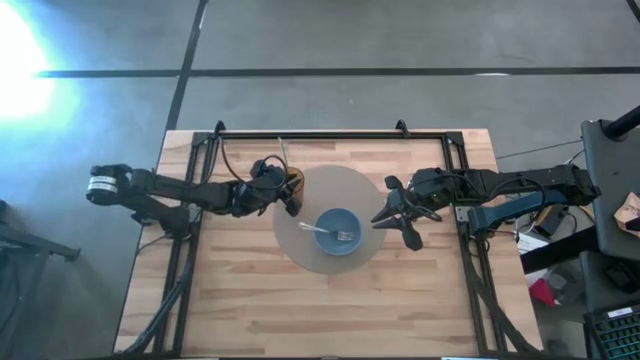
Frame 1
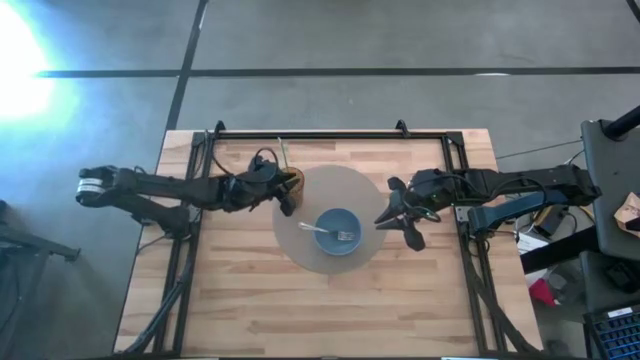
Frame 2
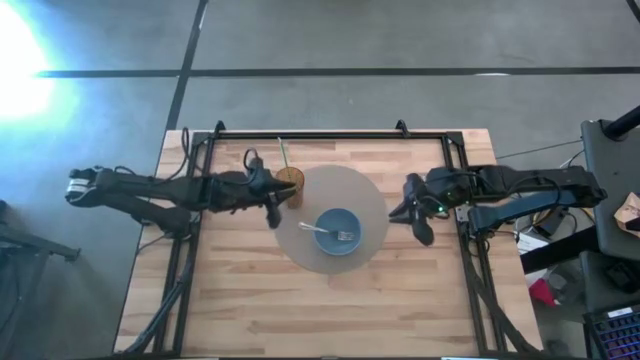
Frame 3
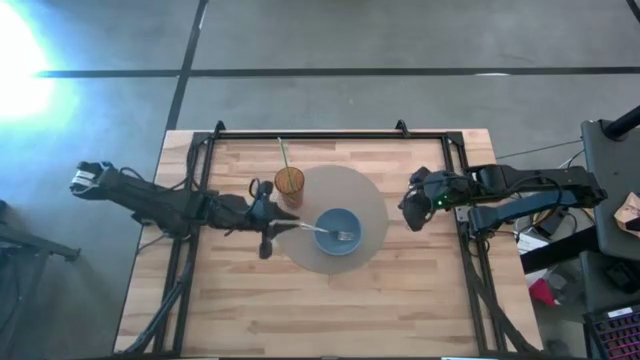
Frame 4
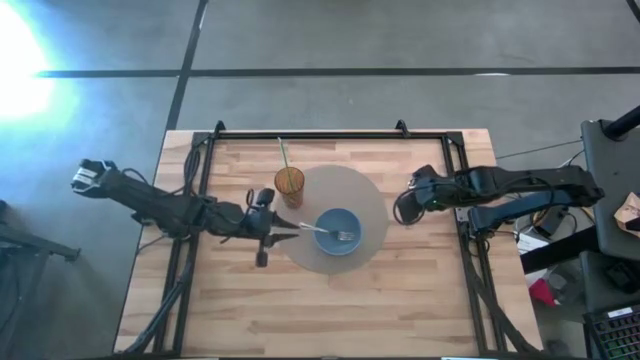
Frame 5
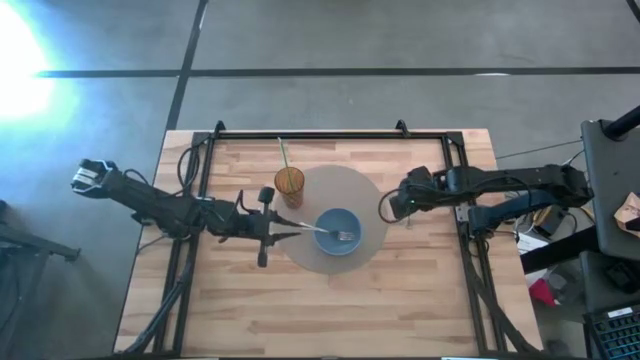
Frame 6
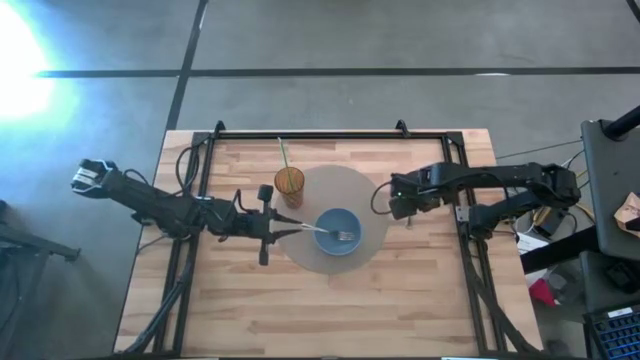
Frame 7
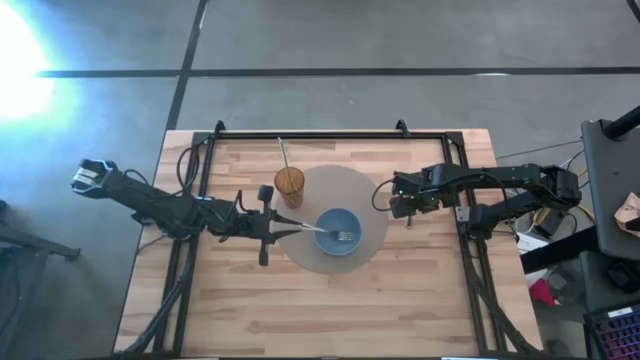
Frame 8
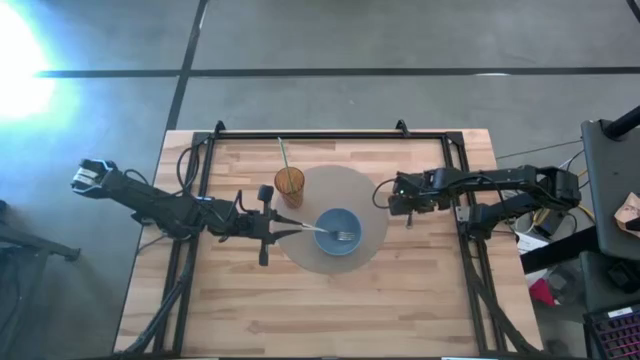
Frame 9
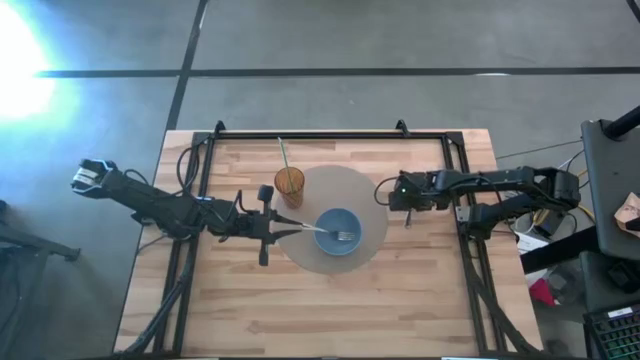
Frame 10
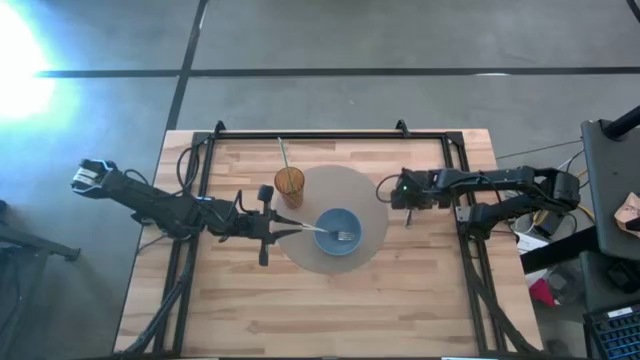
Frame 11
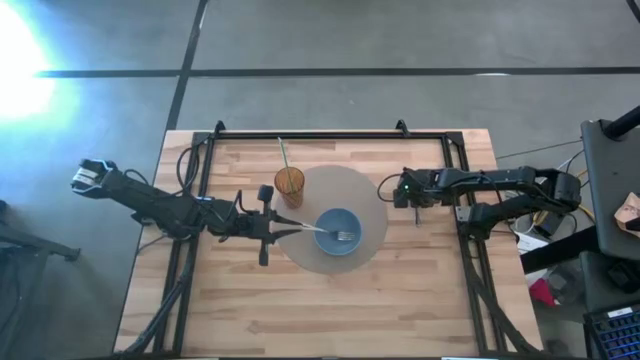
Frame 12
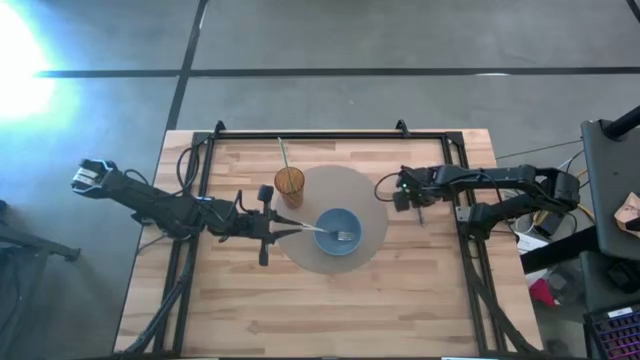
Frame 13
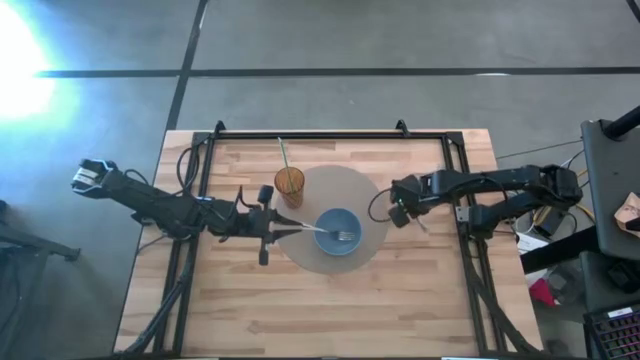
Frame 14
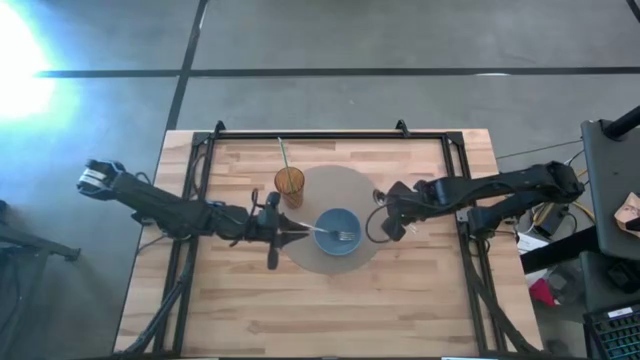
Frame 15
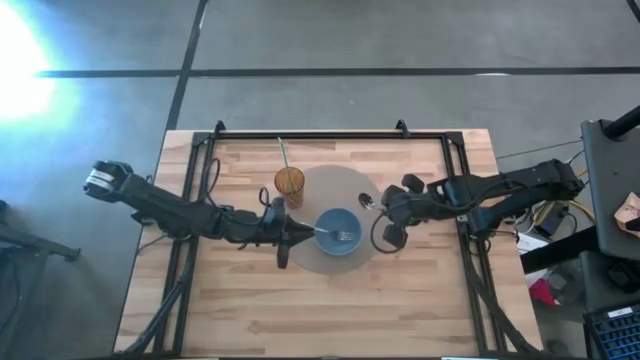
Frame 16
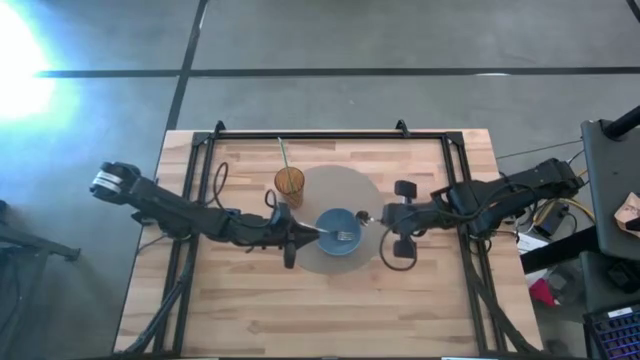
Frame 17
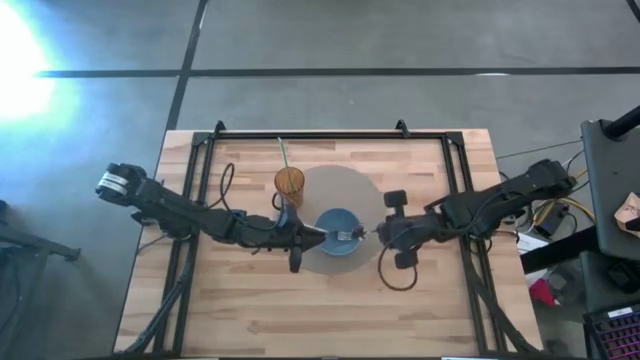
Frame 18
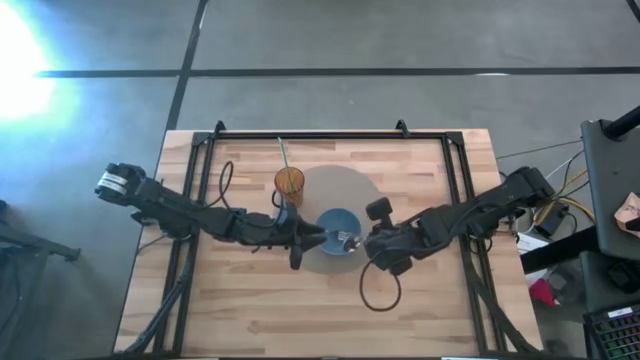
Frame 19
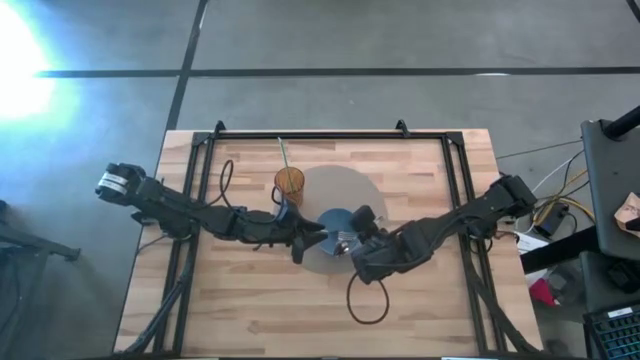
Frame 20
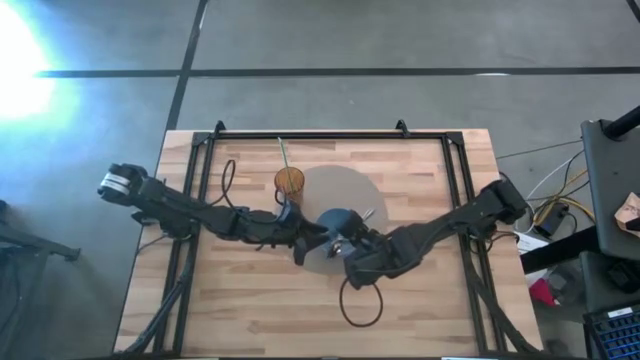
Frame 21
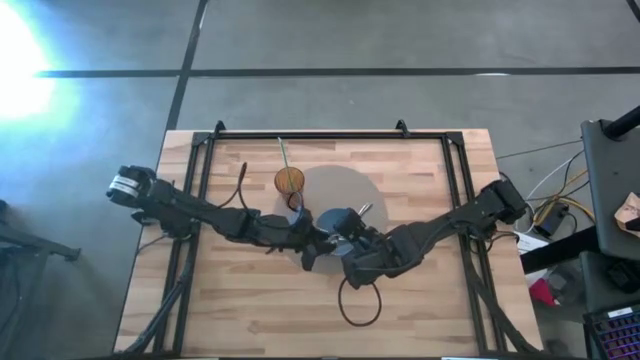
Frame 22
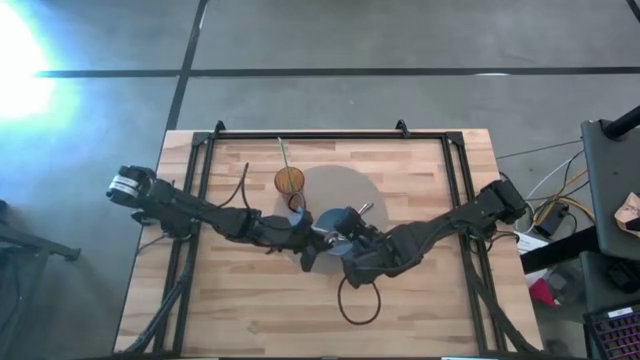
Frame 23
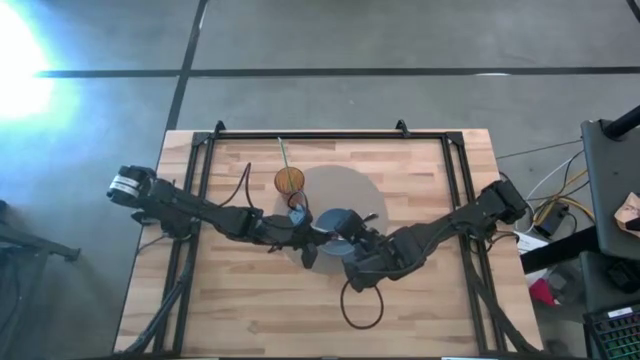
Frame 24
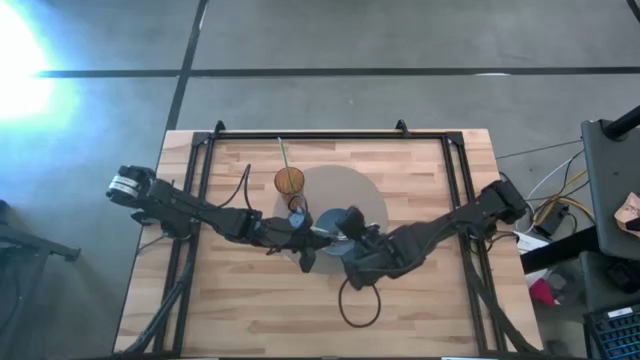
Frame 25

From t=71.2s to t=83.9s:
Task: Pick & Place Utensil
Put the spoon into the bowl

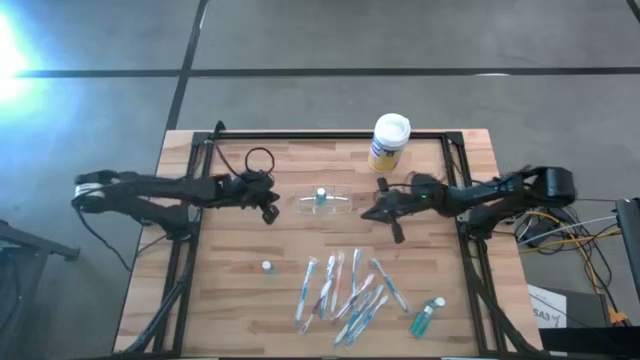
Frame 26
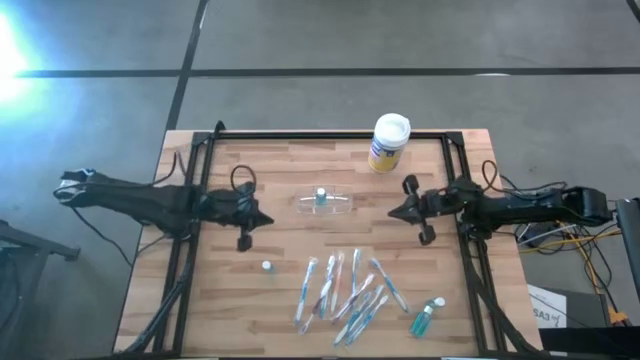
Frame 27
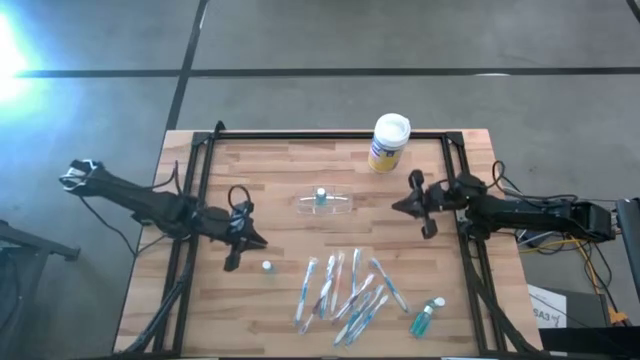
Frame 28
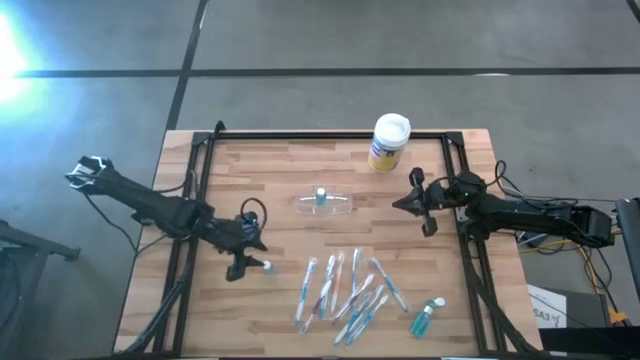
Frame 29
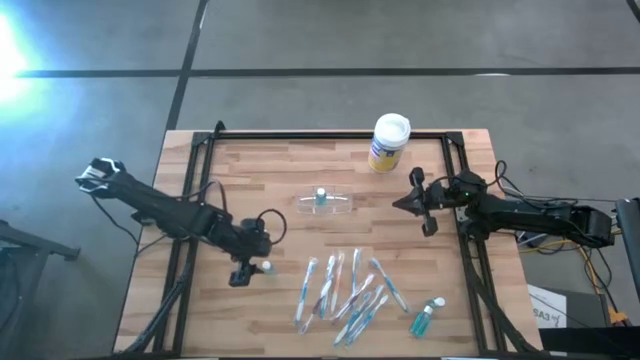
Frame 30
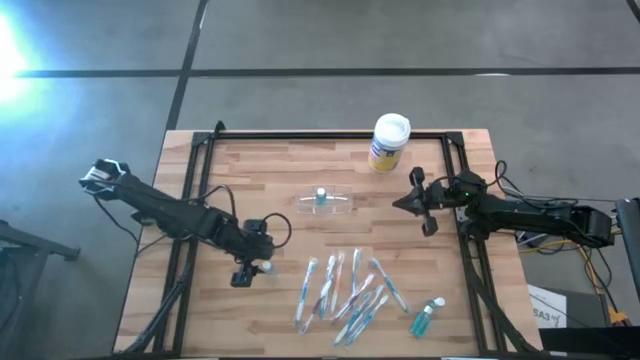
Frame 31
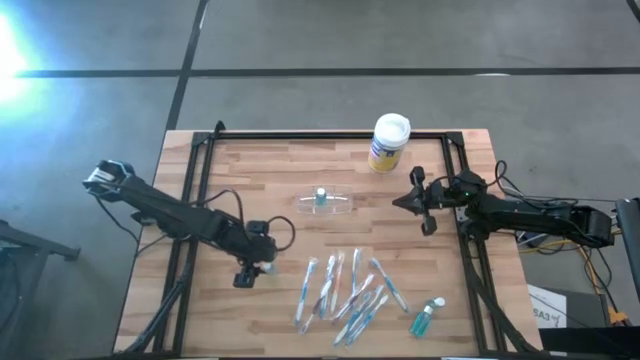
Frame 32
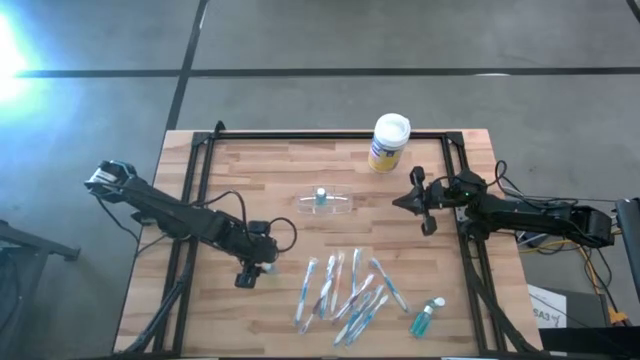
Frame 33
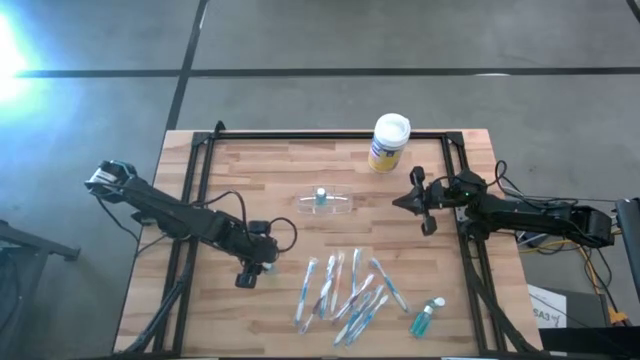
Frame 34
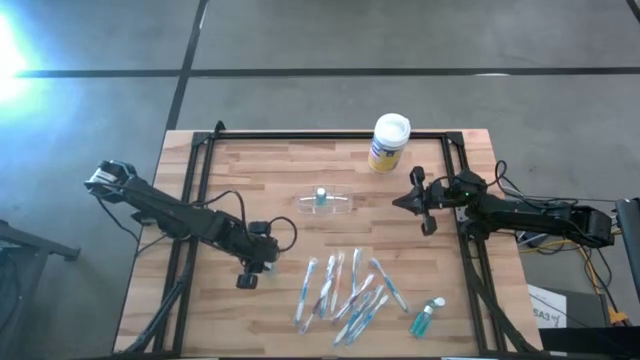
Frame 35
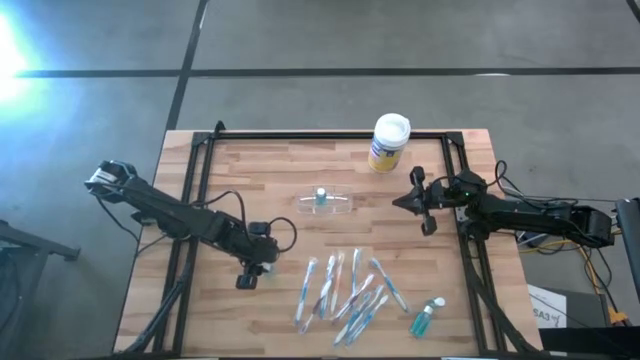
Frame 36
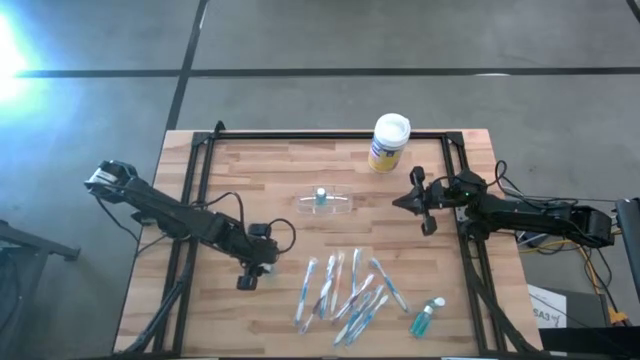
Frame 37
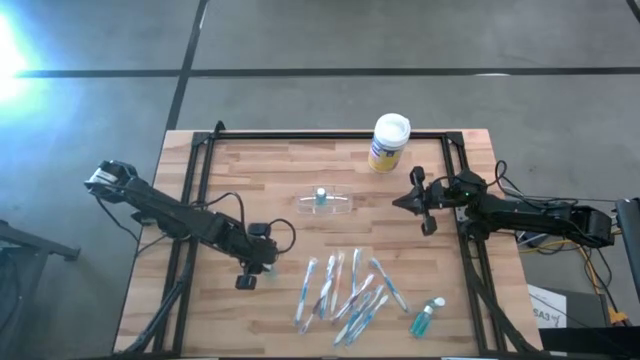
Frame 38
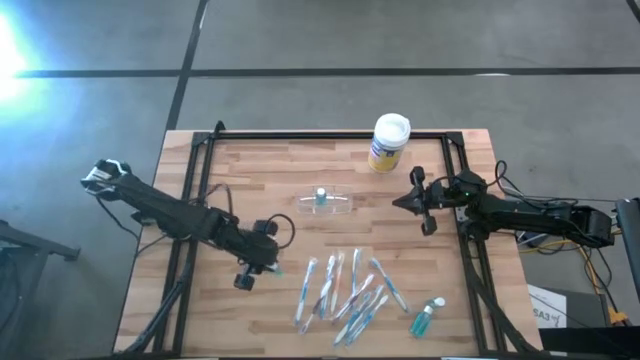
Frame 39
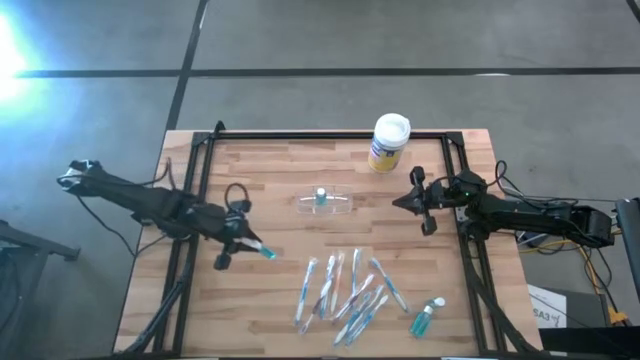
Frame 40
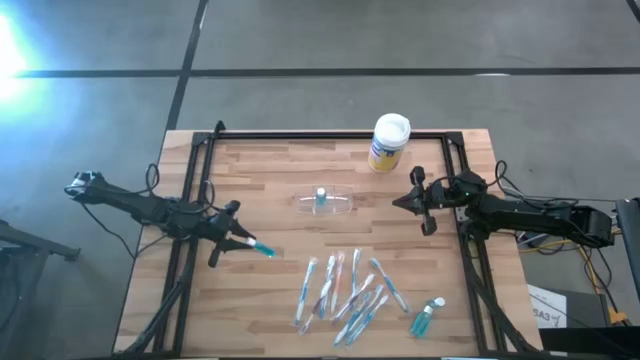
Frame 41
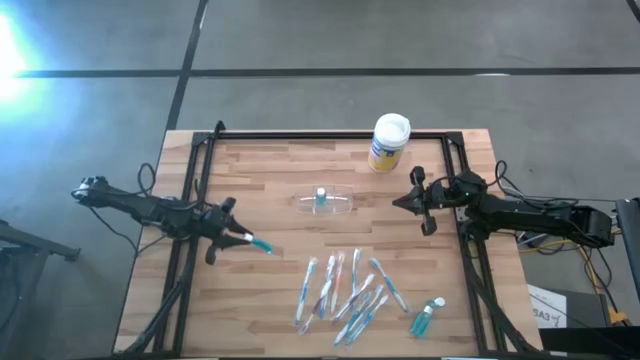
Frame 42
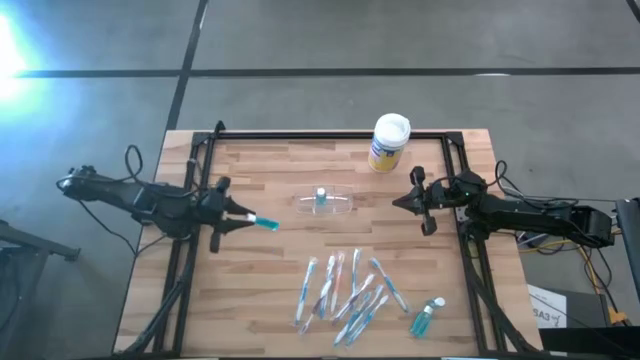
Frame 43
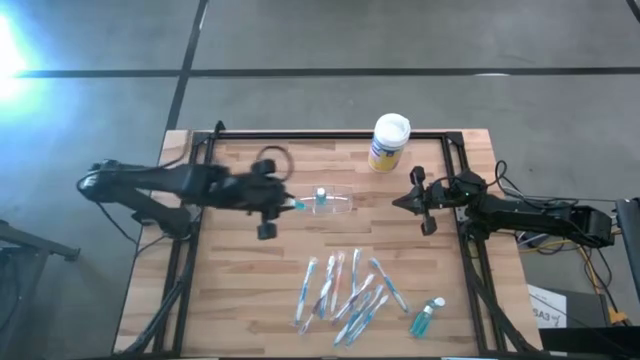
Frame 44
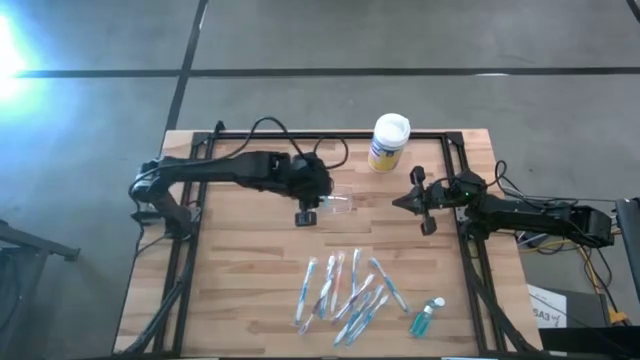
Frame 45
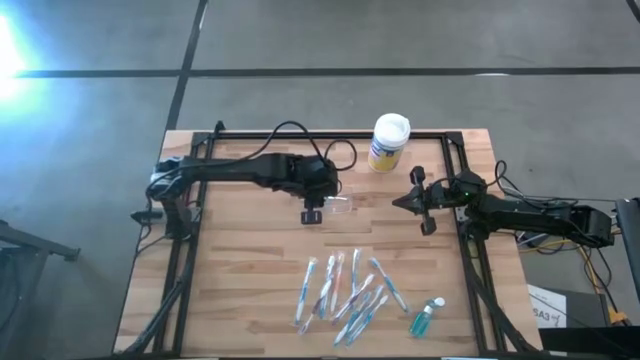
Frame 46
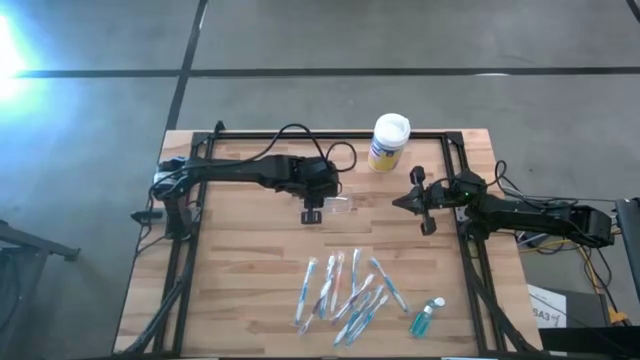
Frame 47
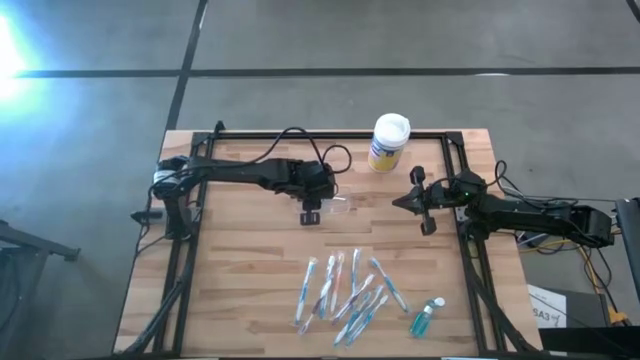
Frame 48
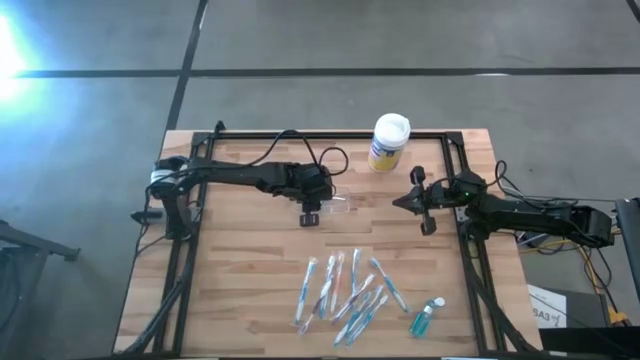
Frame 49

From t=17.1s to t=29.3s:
Task: Pick & Place toothbrushing station
Put the blue mouthwash into the transparent organizer
